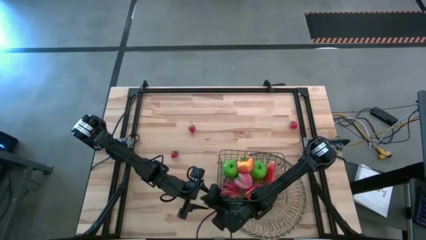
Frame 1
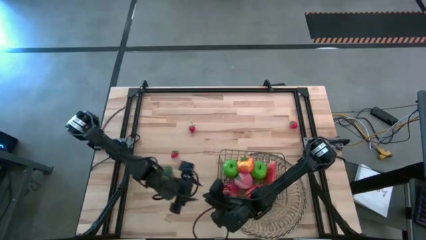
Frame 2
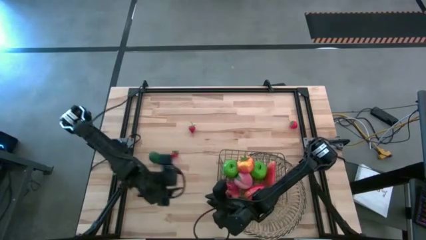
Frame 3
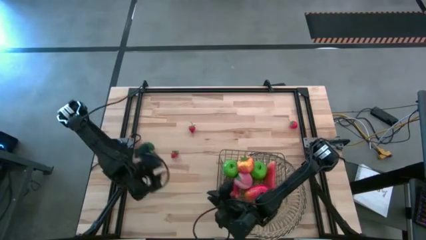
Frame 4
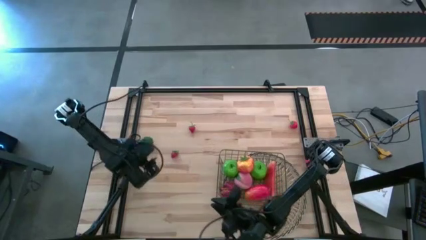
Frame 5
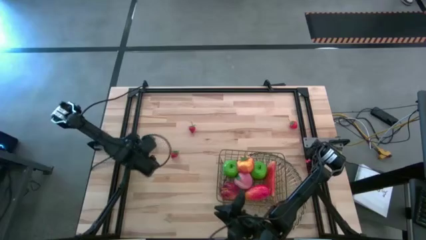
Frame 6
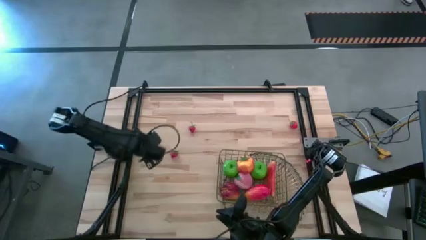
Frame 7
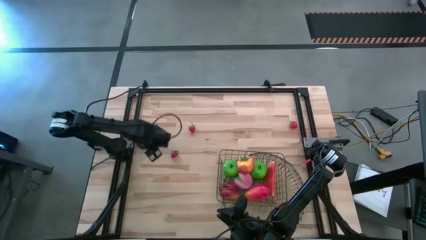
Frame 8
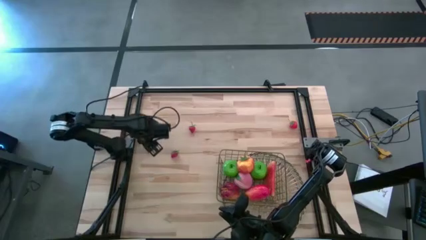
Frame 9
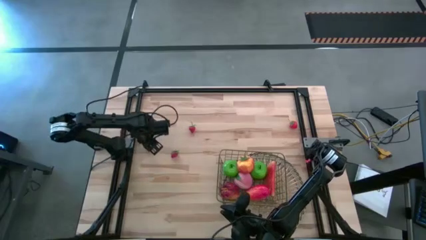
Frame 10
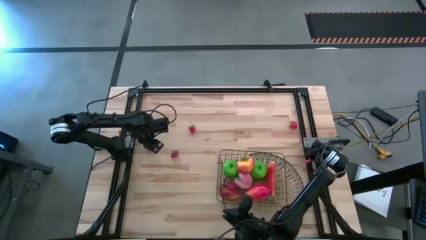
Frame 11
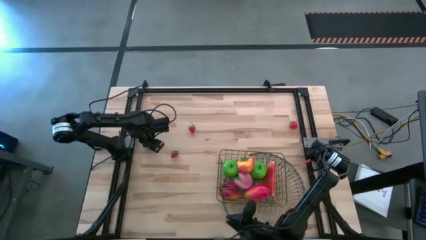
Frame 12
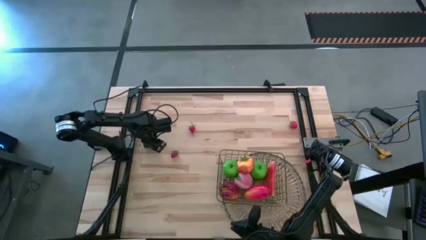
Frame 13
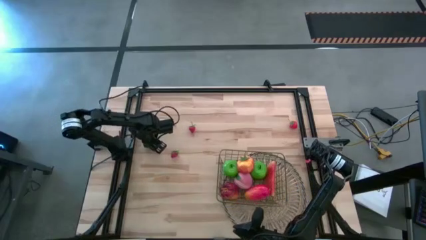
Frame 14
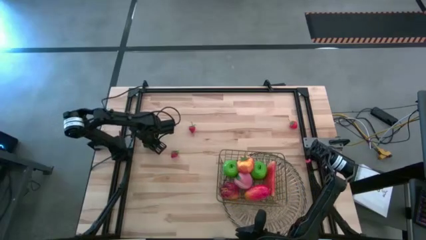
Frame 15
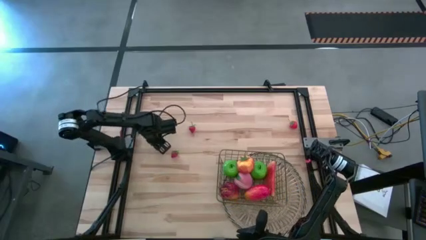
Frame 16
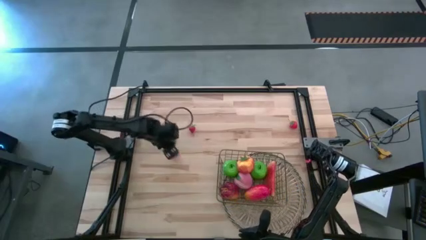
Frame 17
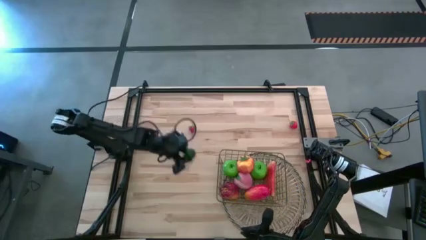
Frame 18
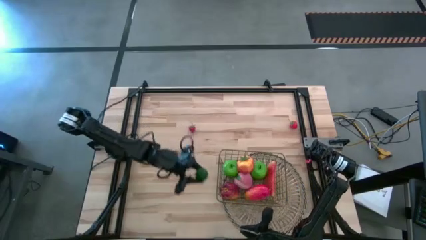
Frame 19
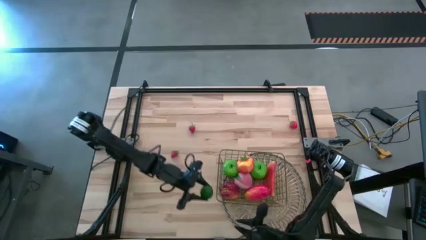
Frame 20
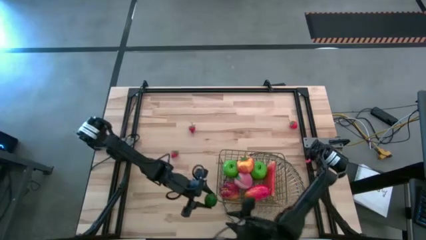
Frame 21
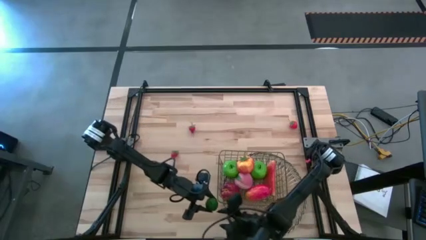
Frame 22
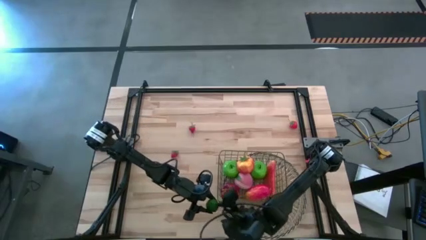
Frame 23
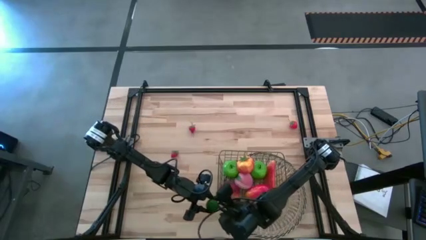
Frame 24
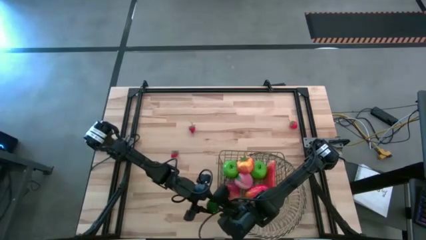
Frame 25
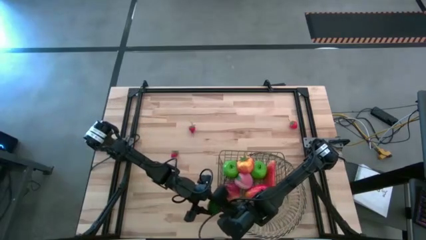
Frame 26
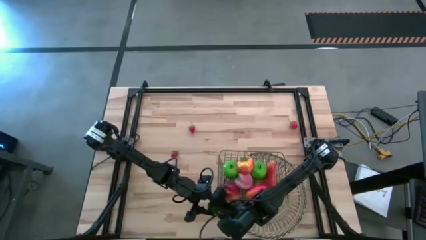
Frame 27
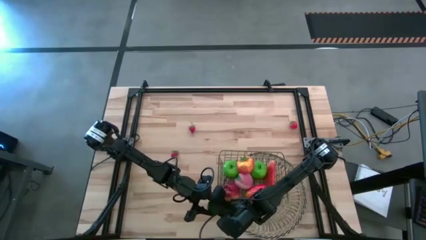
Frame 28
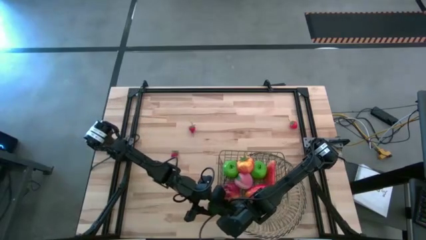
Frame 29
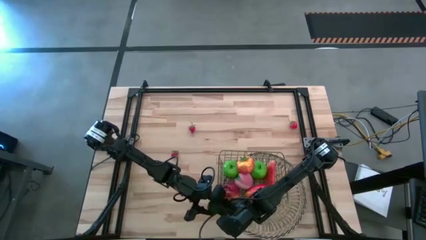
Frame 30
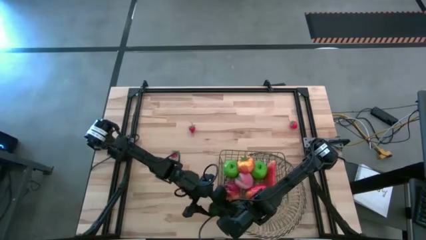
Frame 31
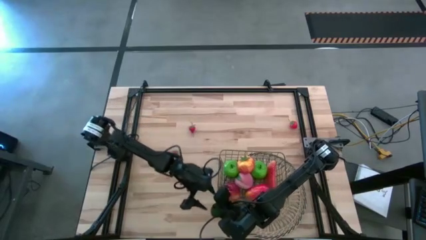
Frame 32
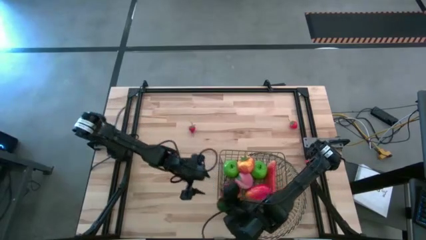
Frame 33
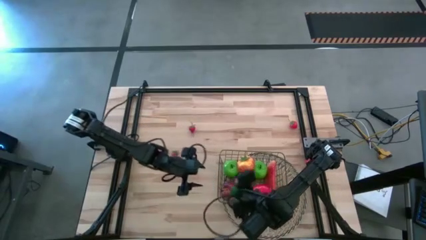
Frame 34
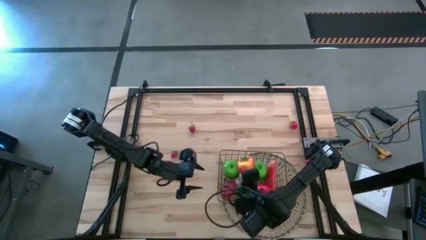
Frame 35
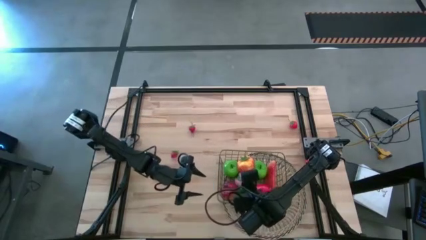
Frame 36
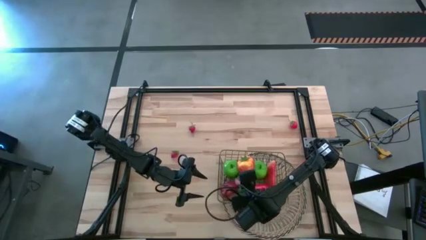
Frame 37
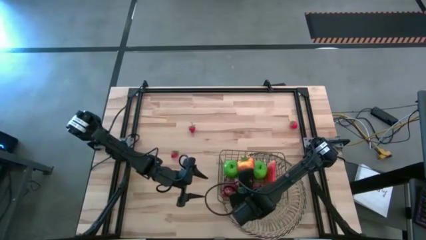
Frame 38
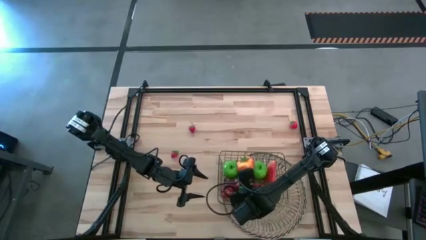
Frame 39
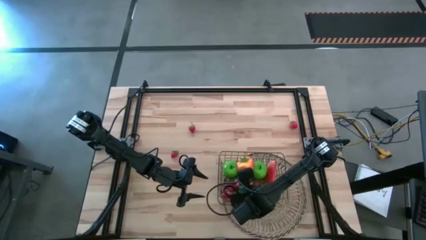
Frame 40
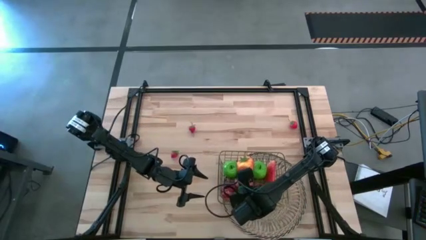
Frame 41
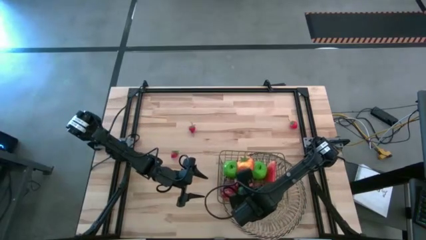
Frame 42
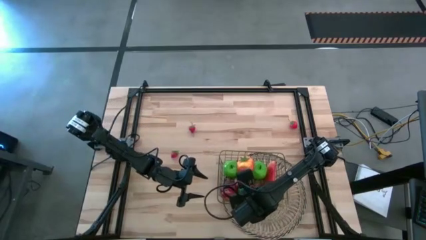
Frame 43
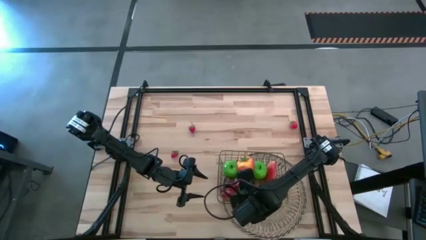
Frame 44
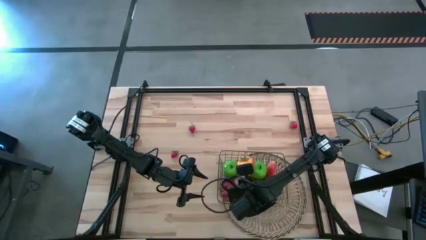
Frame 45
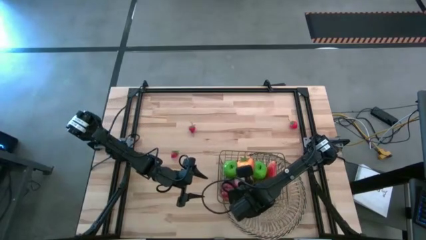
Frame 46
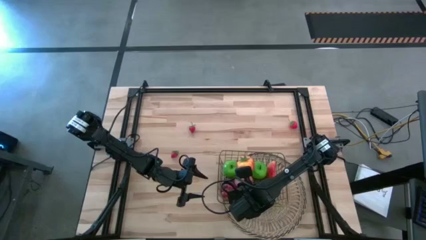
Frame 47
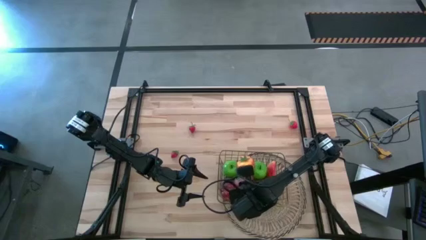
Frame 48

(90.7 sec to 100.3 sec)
Task: Build produce basket
Put the lime into the wire basket

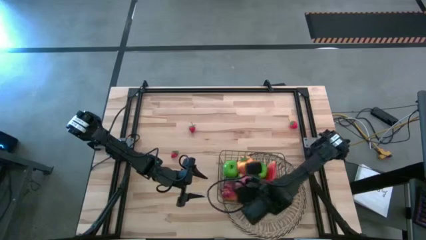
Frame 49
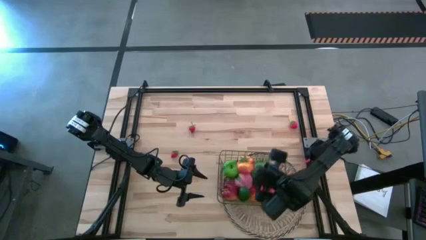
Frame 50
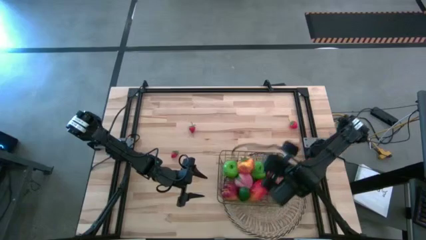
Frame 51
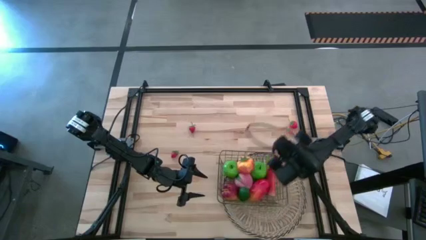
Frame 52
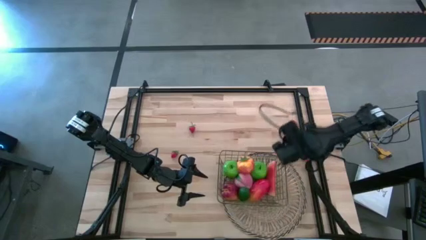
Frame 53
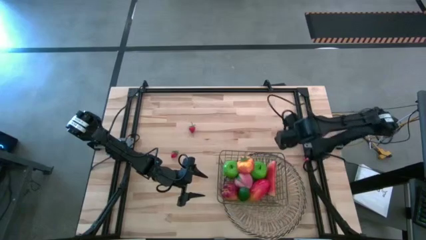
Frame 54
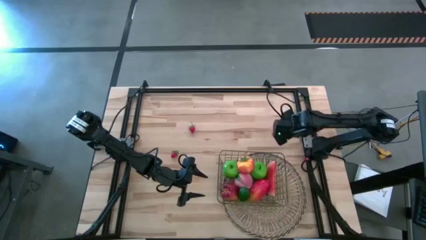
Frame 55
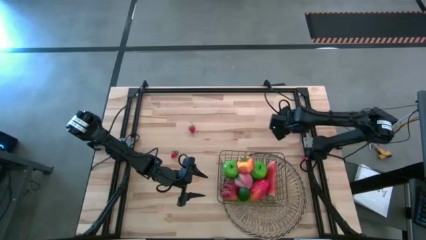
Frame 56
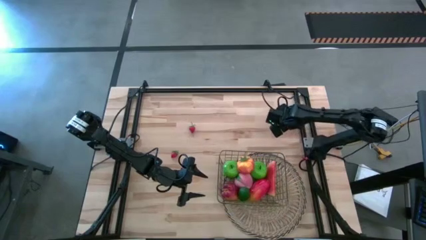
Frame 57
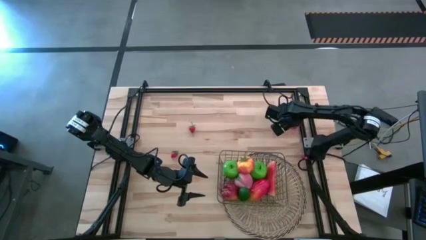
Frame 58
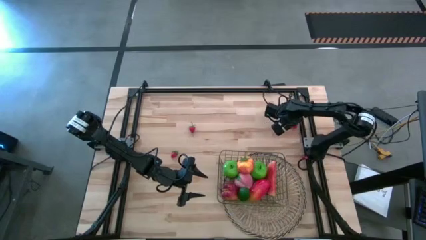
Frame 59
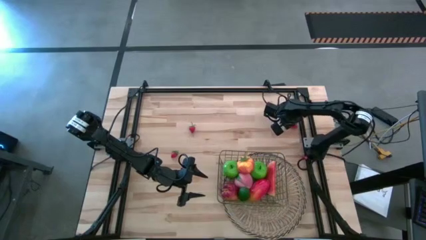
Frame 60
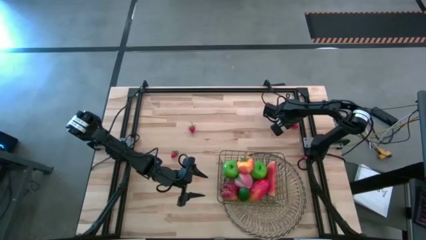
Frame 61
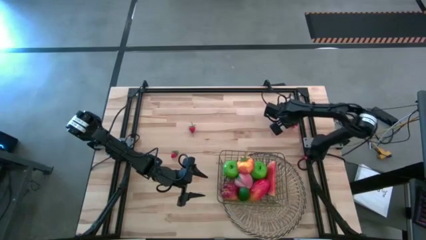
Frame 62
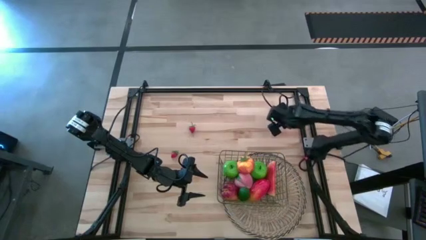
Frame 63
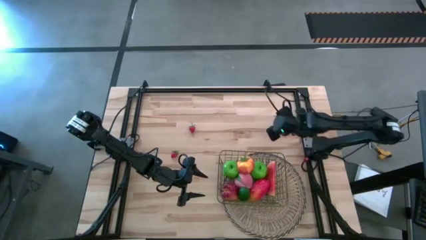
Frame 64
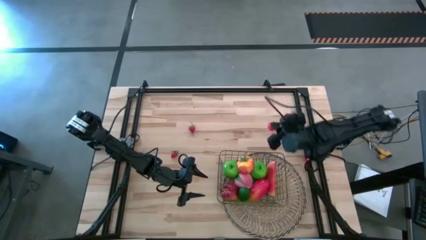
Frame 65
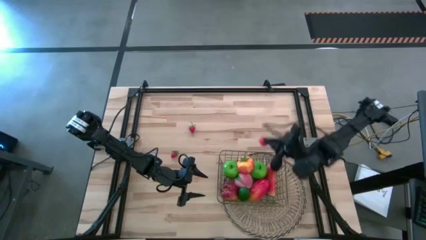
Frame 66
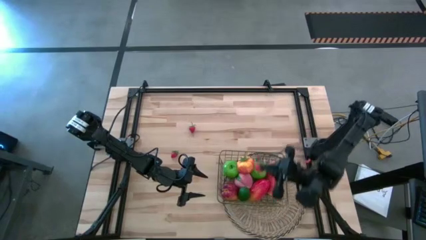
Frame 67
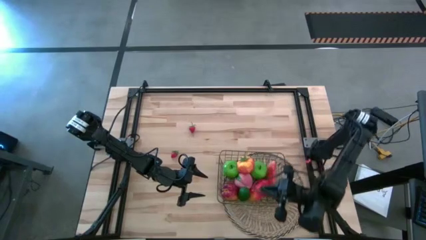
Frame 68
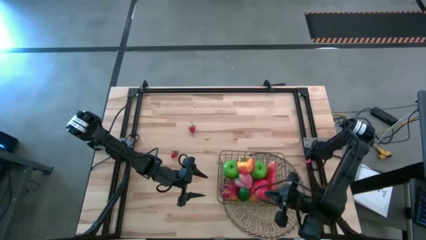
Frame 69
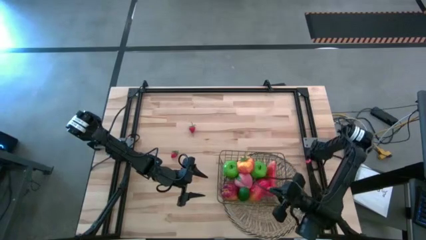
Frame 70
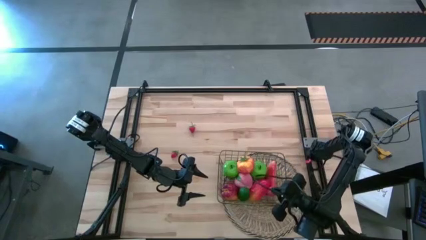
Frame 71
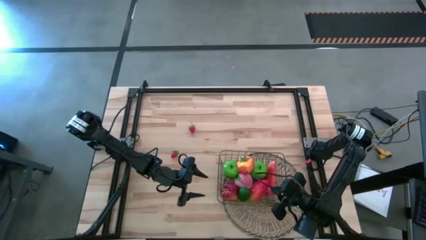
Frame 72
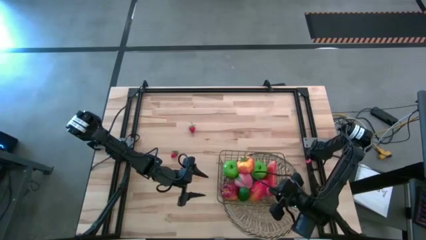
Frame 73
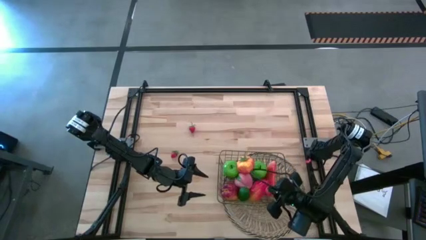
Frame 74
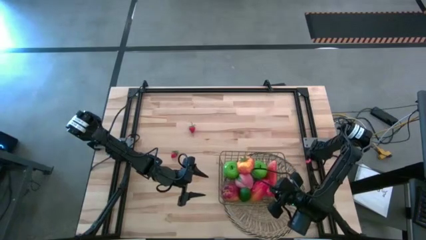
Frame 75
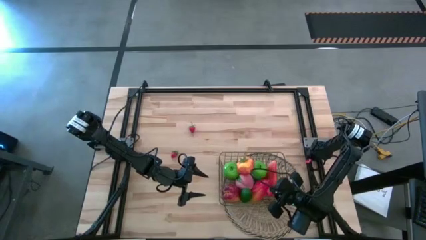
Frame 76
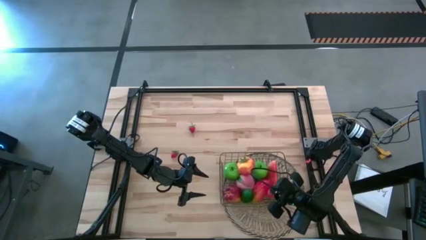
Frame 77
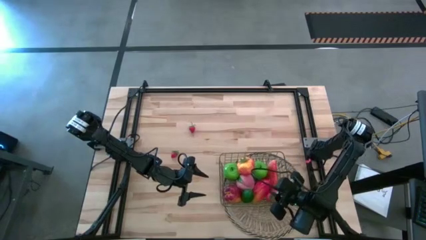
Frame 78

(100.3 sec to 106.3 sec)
Put the top right strawberry into the wire basket
